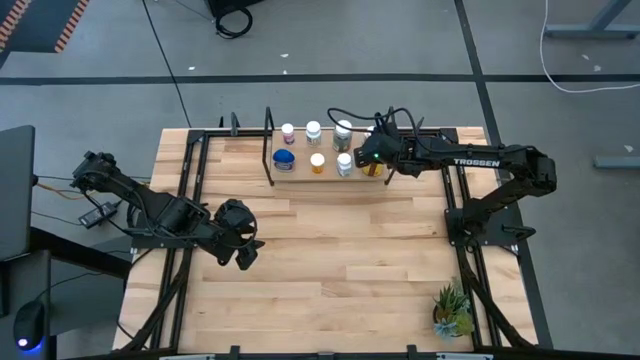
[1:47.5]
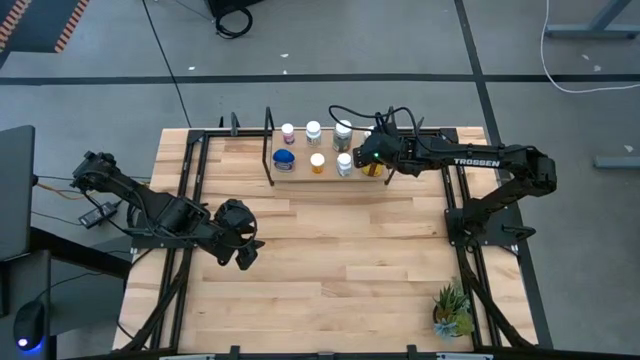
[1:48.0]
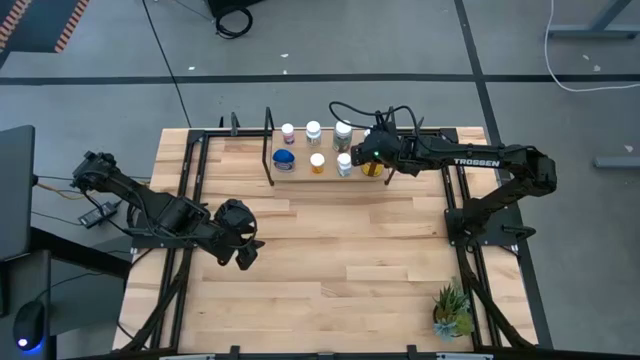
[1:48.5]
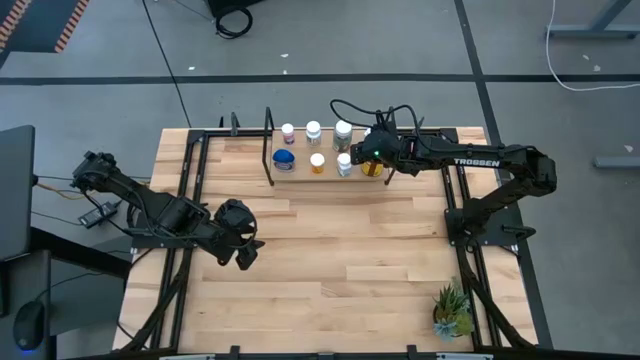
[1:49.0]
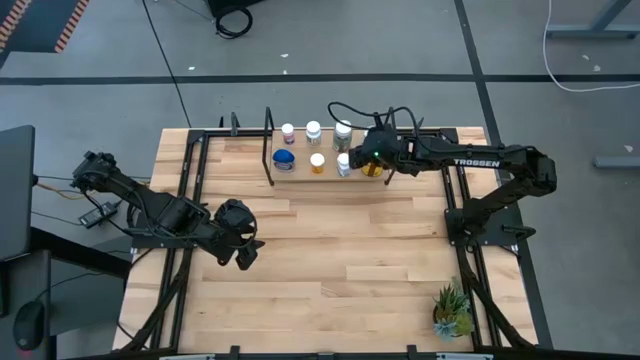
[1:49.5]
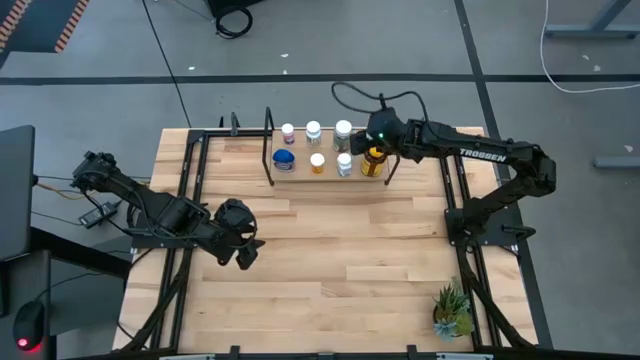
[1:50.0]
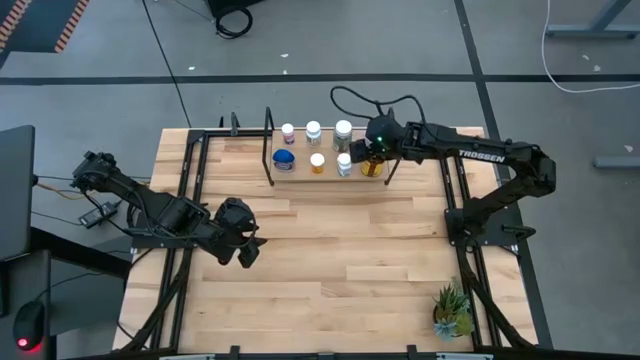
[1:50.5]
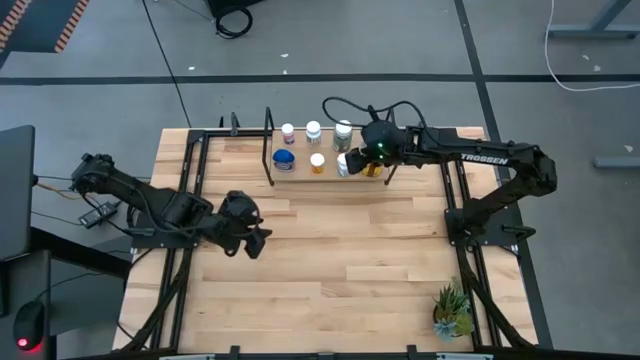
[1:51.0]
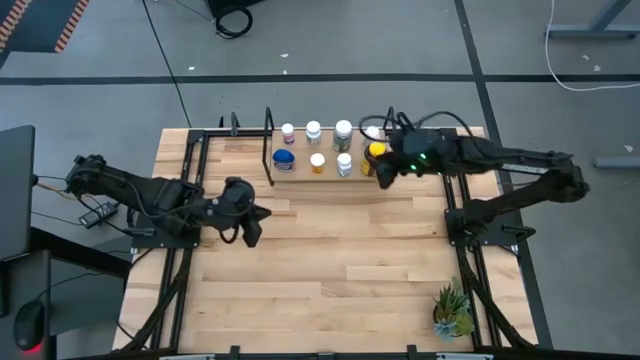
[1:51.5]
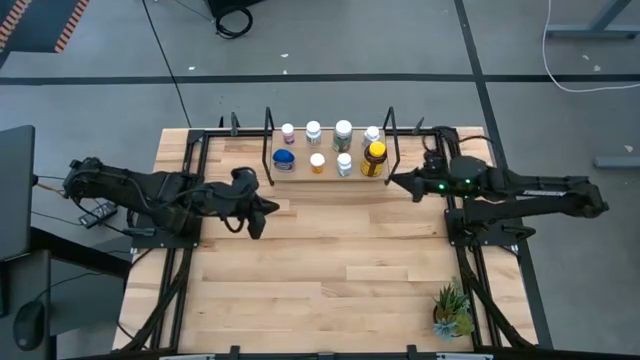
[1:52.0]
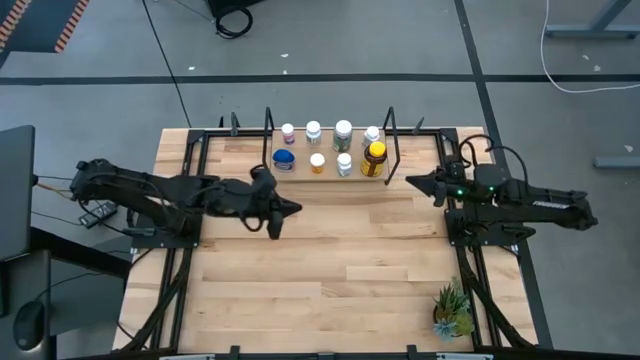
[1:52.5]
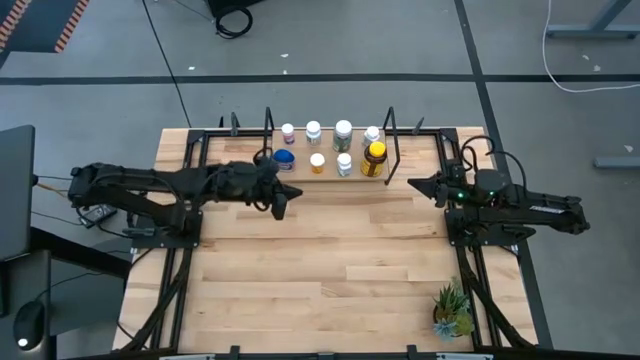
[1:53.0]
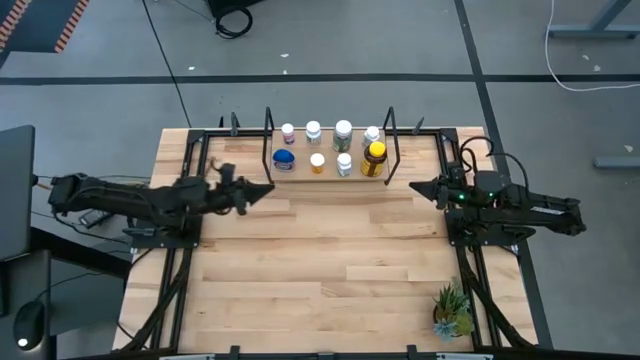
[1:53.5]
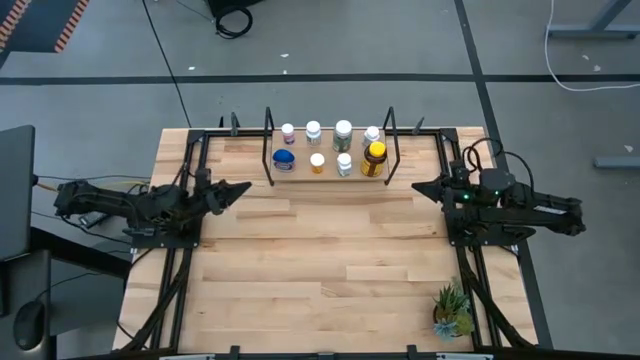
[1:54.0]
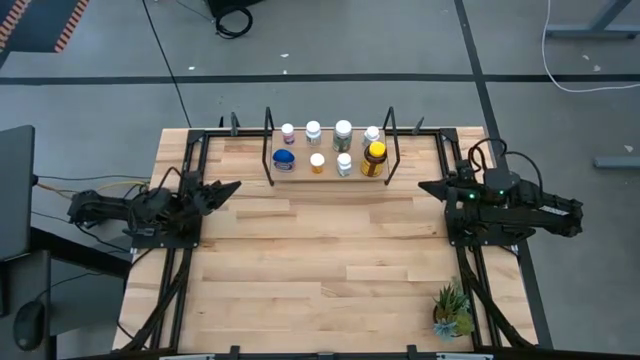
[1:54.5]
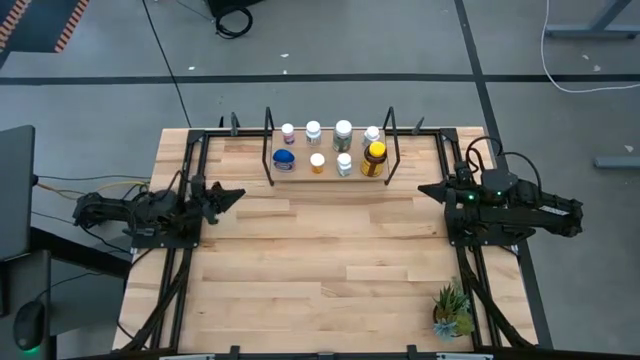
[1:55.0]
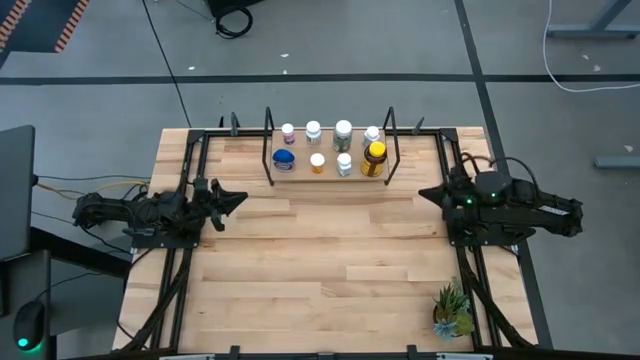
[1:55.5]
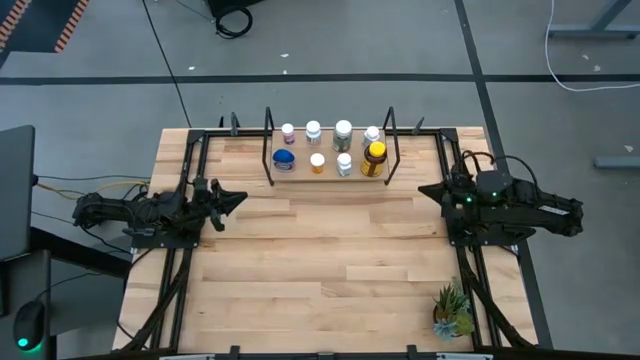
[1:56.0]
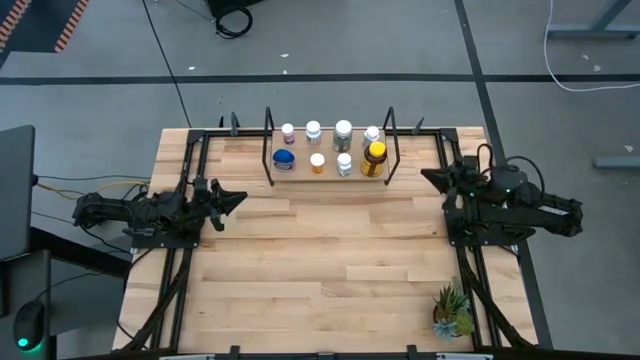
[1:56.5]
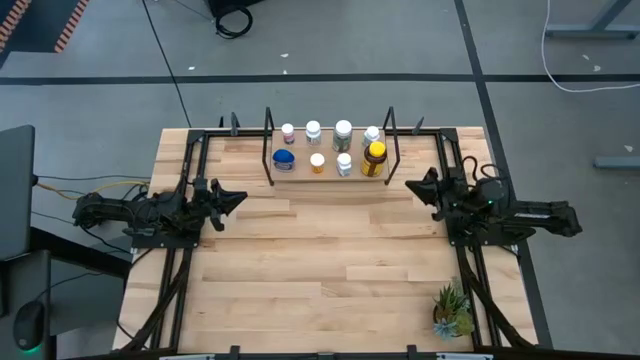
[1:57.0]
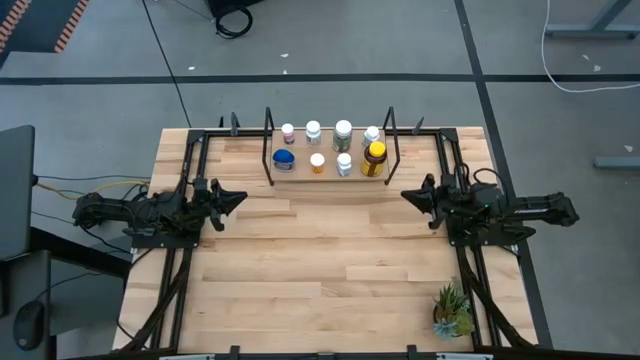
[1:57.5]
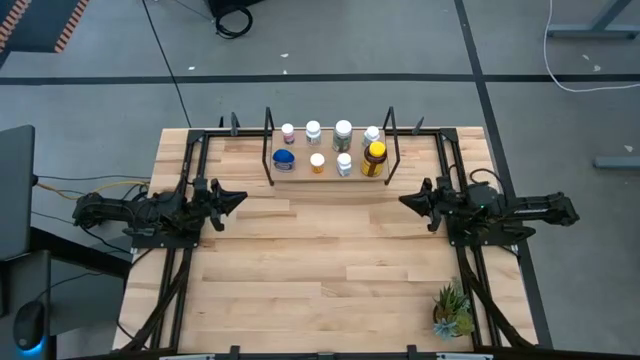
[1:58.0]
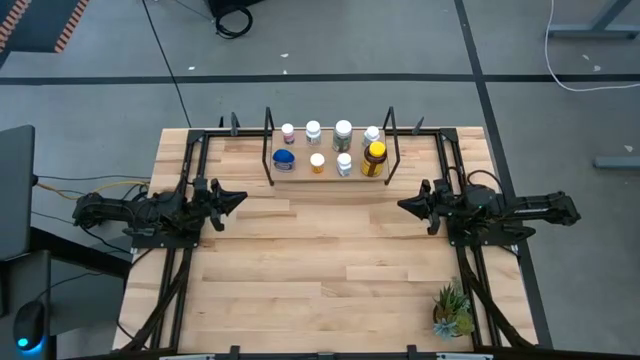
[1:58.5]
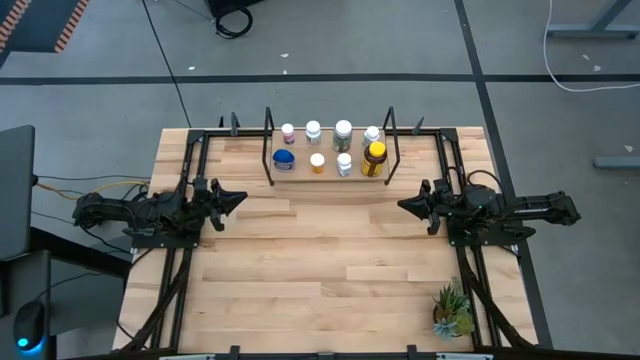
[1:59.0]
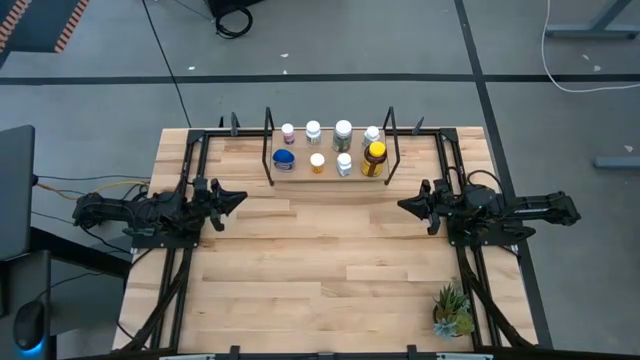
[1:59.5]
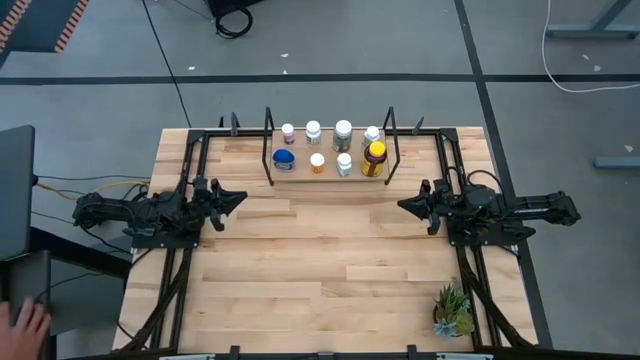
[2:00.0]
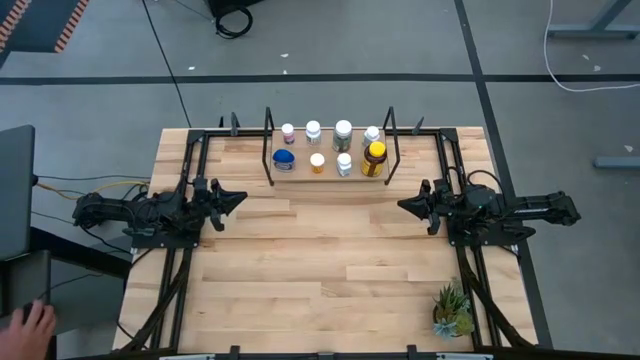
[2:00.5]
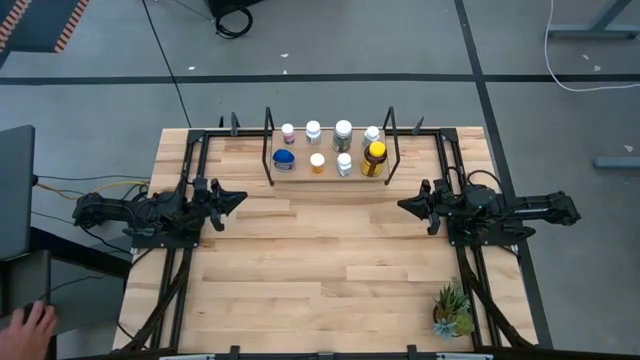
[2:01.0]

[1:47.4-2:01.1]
Task: Pick and place medicine bottles onto shelf by color
Return to Home Position

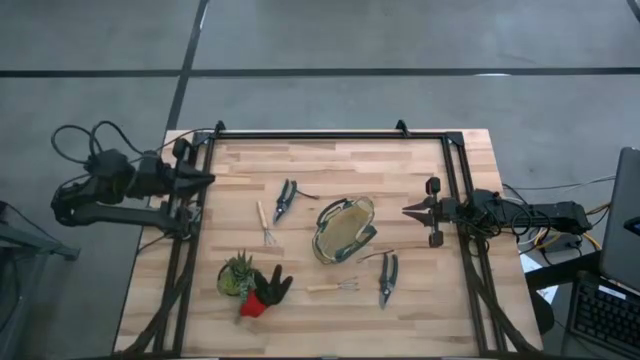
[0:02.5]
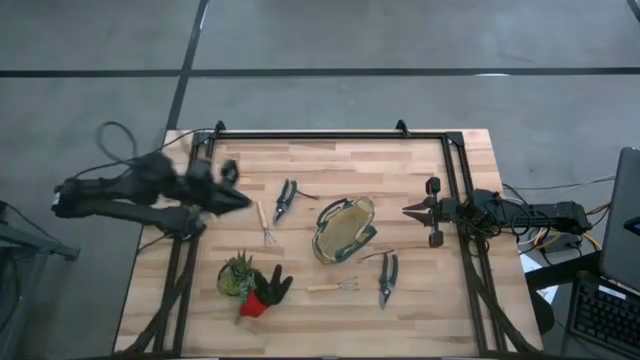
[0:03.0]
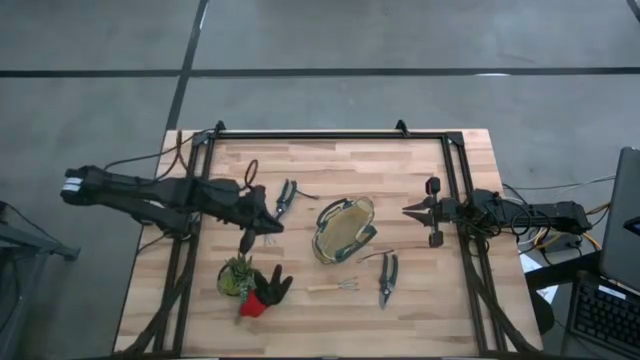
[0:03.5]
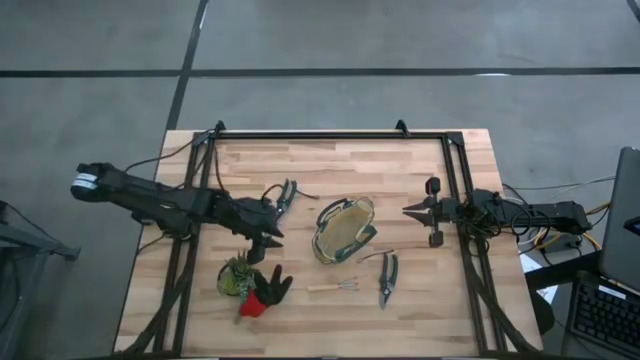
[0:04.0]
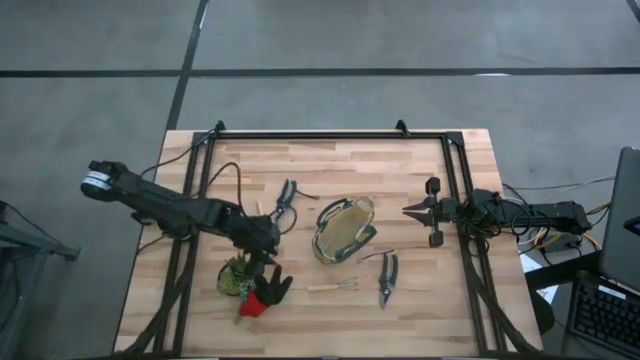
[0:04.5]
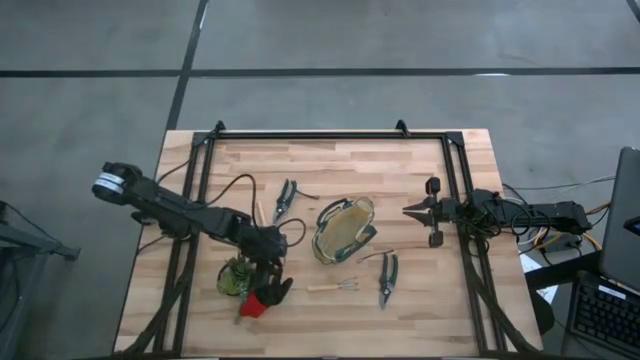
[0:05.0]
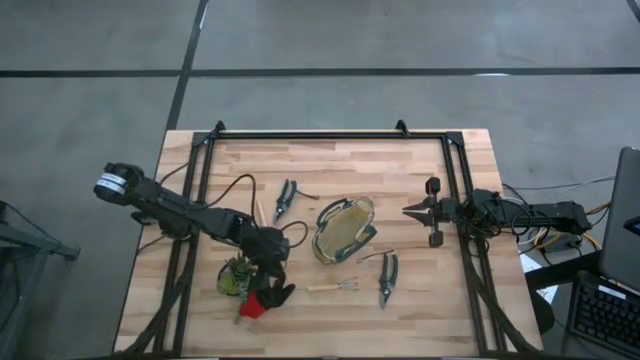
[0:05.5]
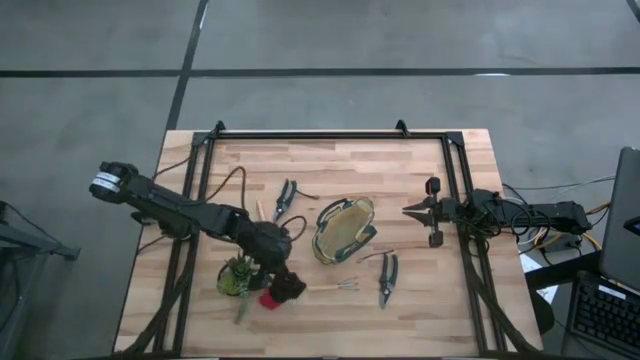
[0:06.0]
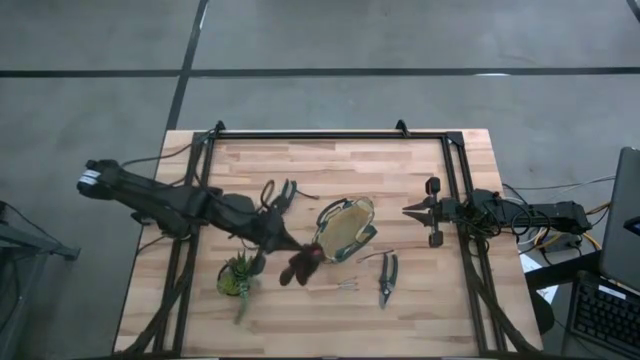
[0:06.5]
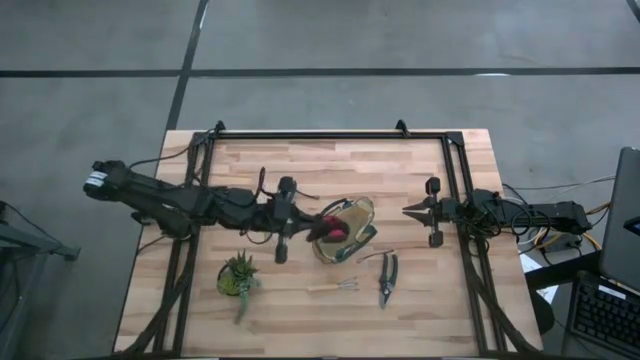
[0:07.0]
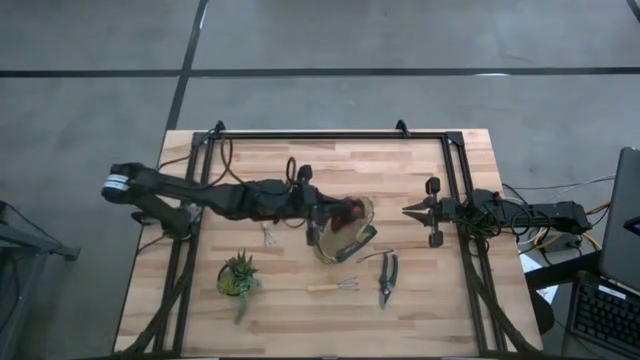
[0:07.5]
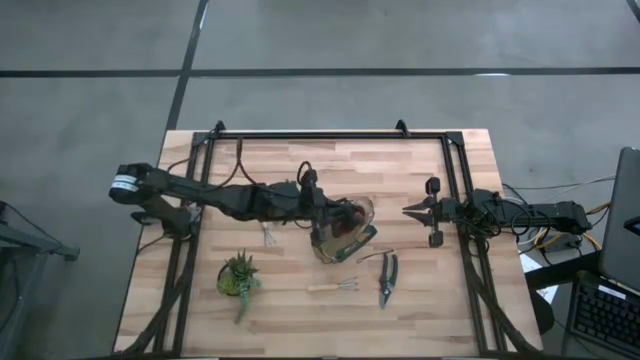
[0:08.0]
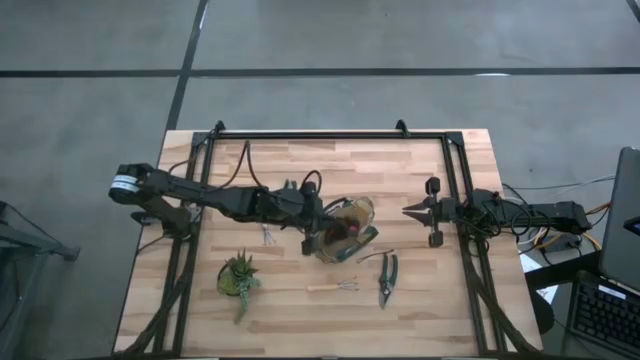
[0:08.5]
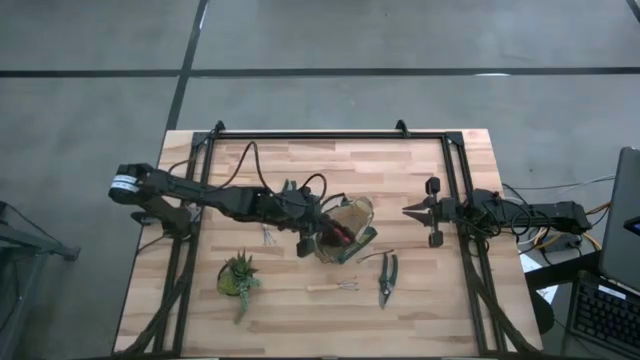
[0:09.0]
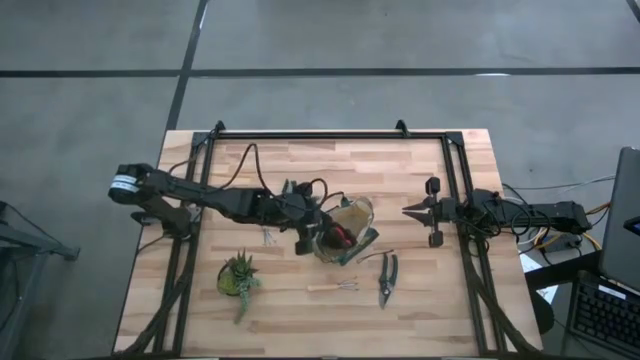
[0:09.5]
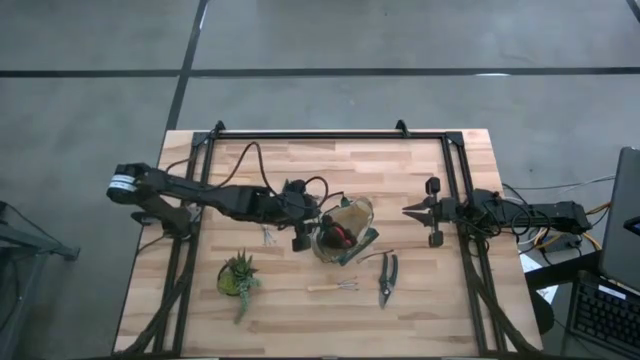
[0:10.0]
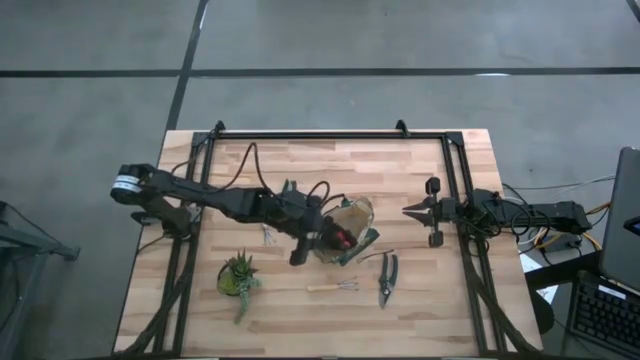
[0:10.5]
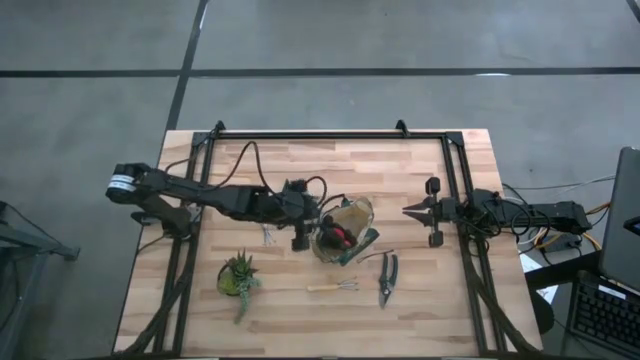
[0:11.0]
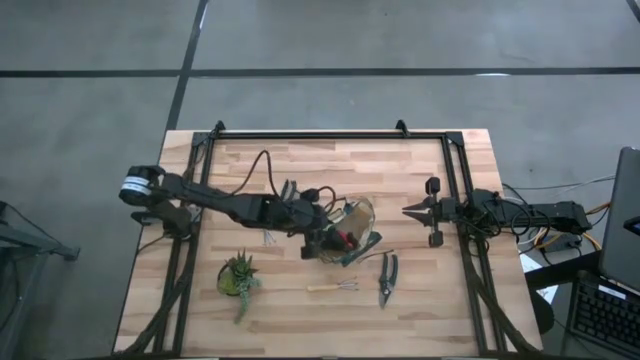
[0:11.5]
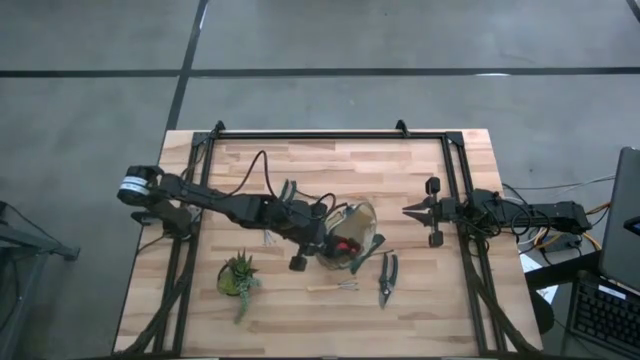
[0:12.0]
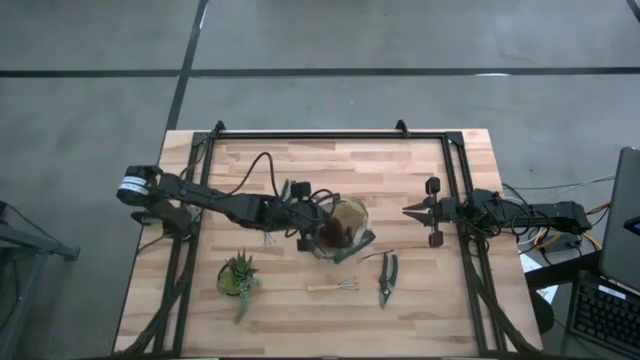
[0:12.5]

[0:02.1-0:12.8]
Task: Pick & Place Garden tools in Gardening bag
Put the red gloves into the green gardening bag
